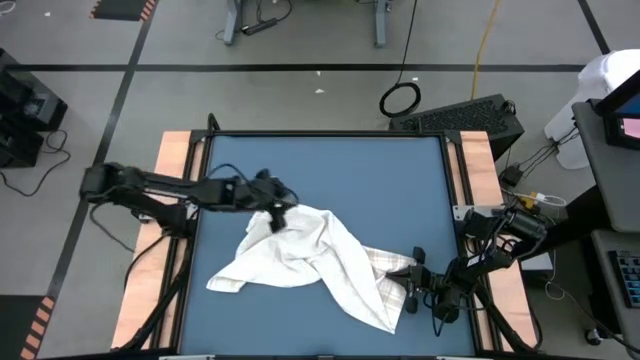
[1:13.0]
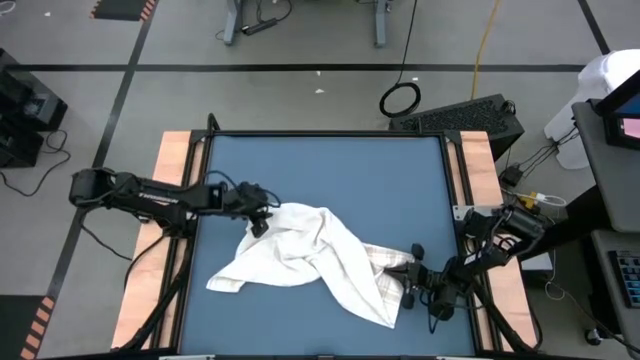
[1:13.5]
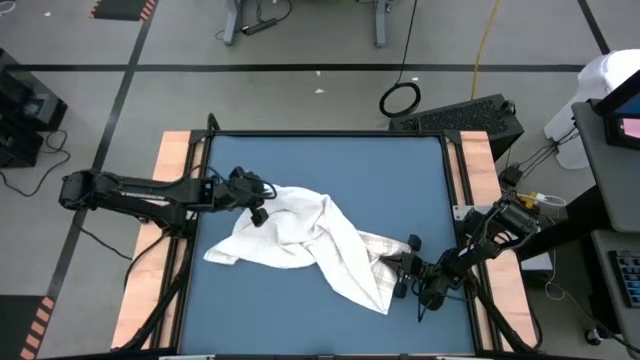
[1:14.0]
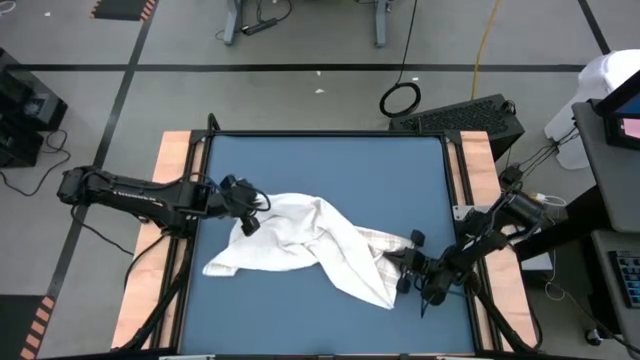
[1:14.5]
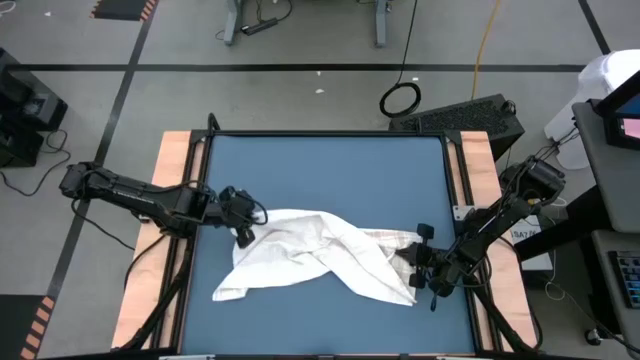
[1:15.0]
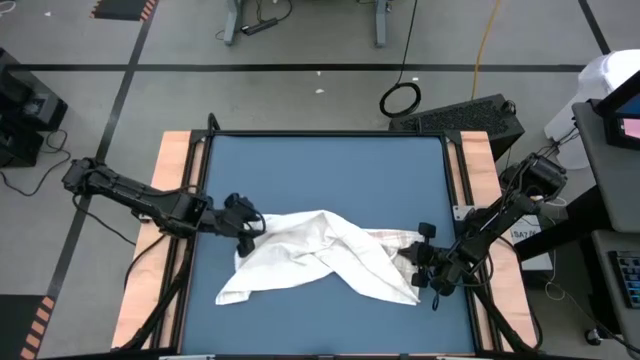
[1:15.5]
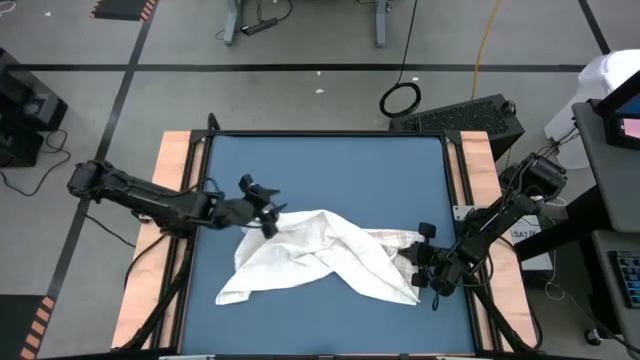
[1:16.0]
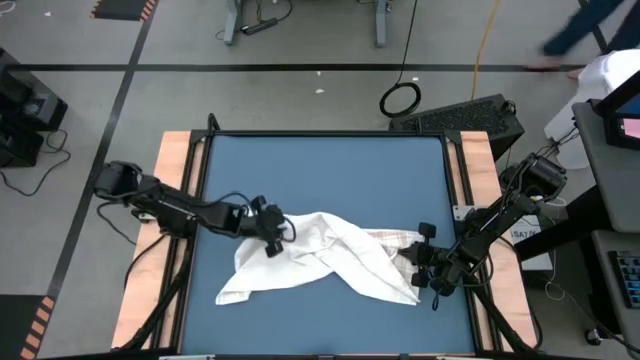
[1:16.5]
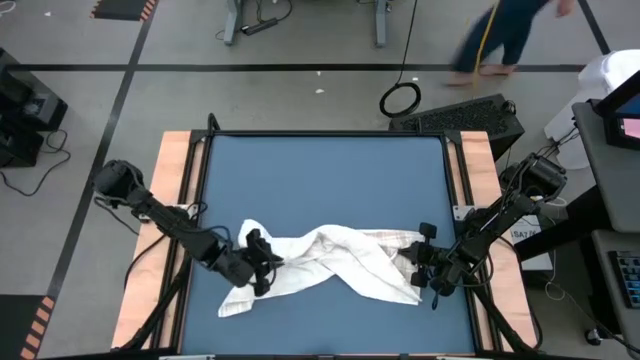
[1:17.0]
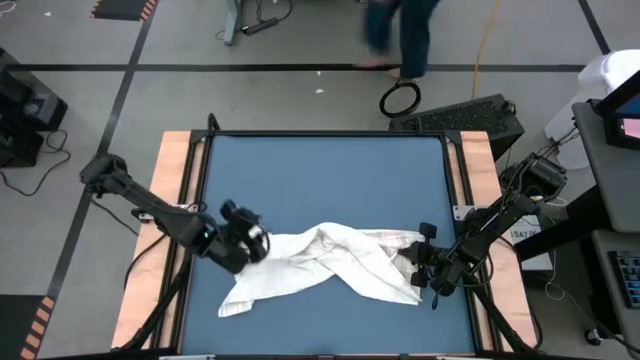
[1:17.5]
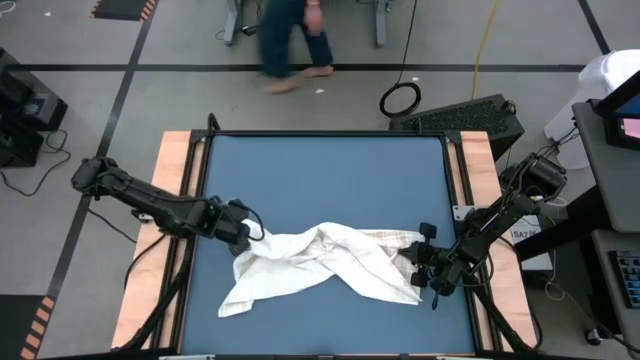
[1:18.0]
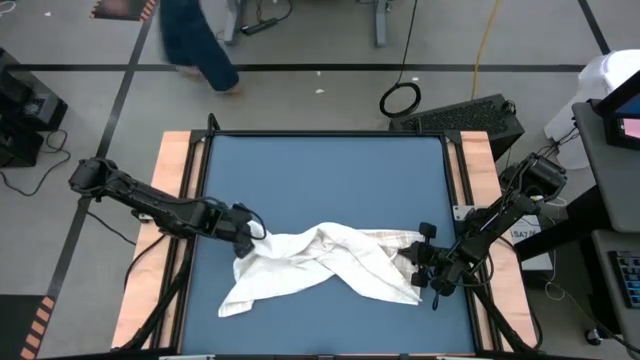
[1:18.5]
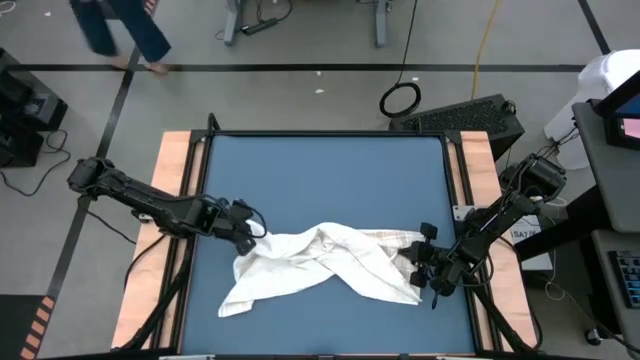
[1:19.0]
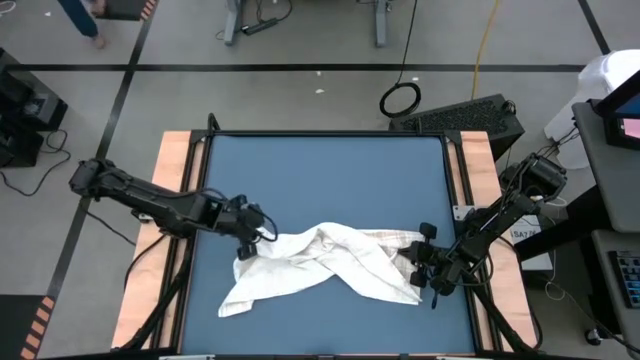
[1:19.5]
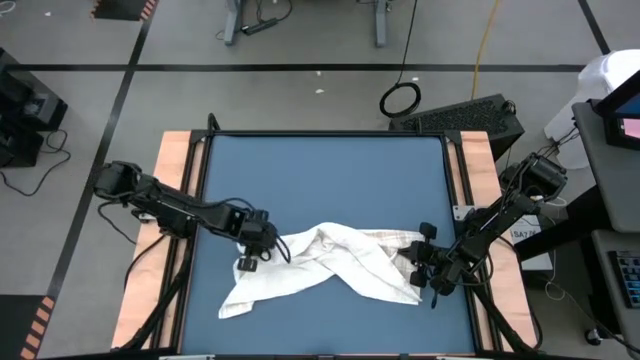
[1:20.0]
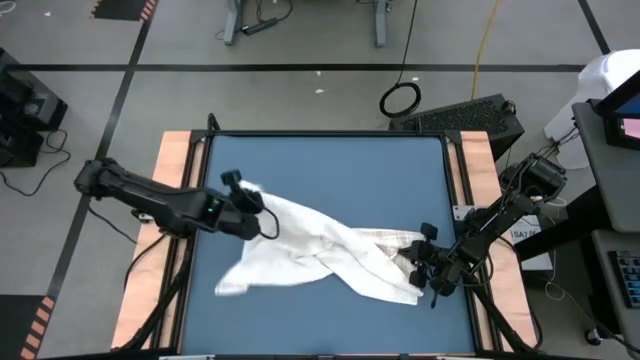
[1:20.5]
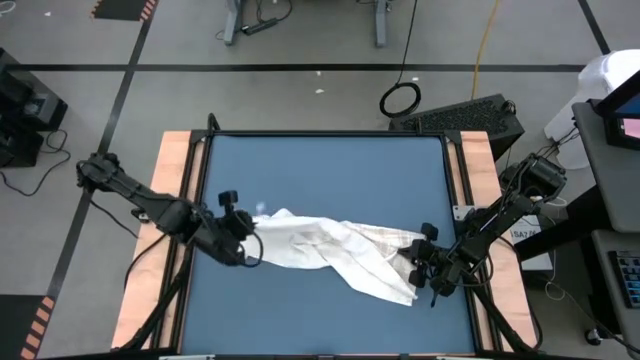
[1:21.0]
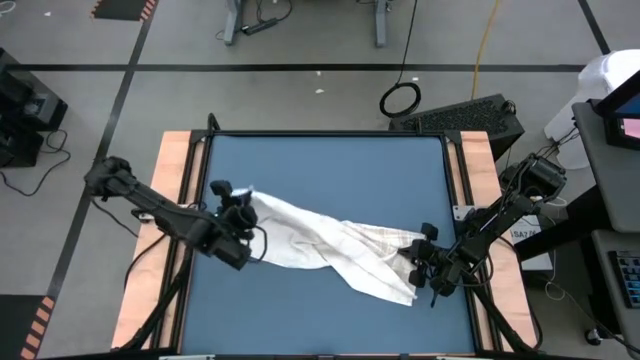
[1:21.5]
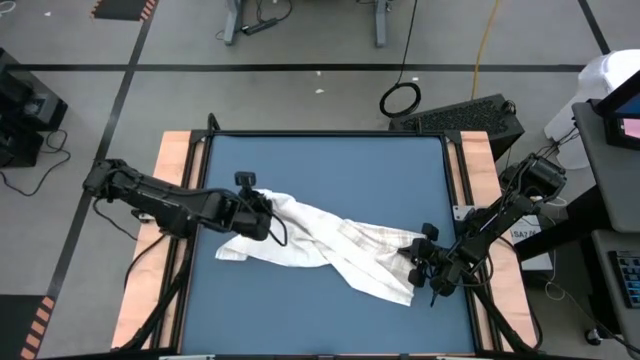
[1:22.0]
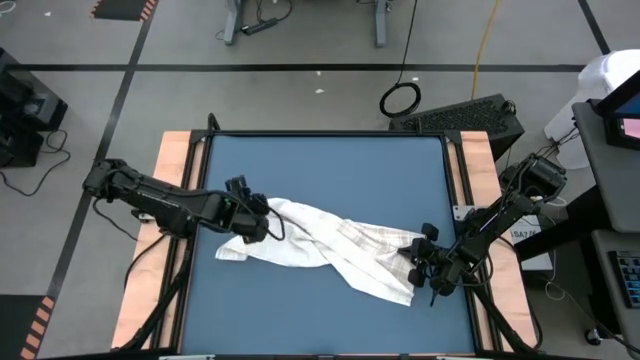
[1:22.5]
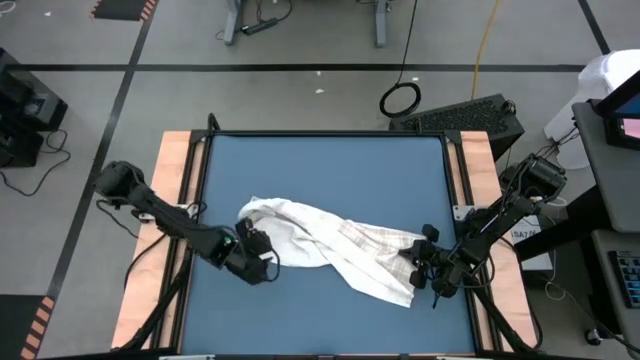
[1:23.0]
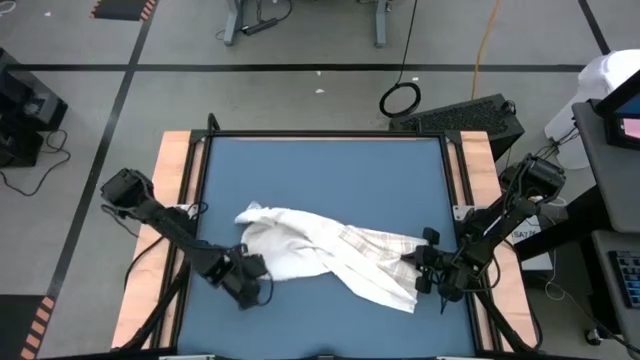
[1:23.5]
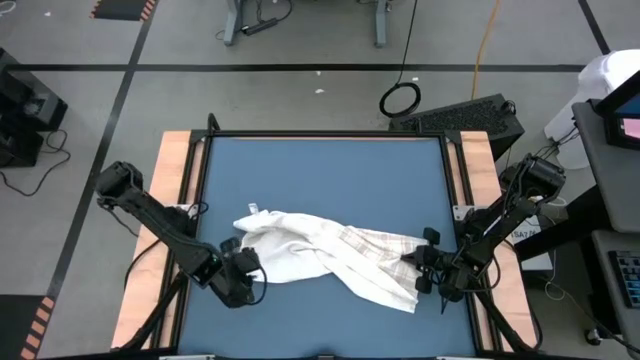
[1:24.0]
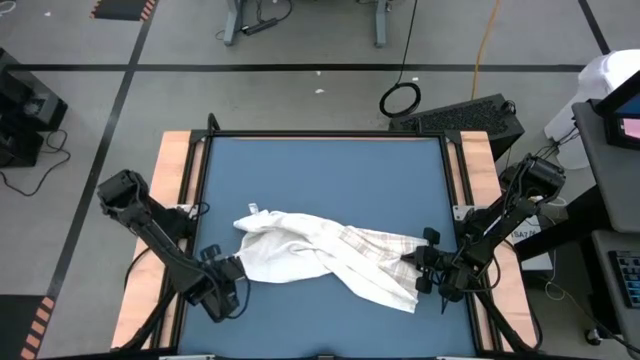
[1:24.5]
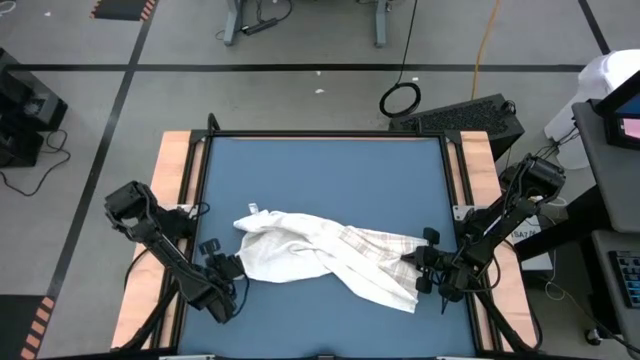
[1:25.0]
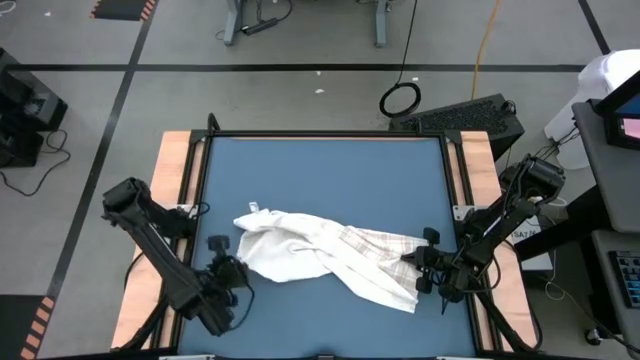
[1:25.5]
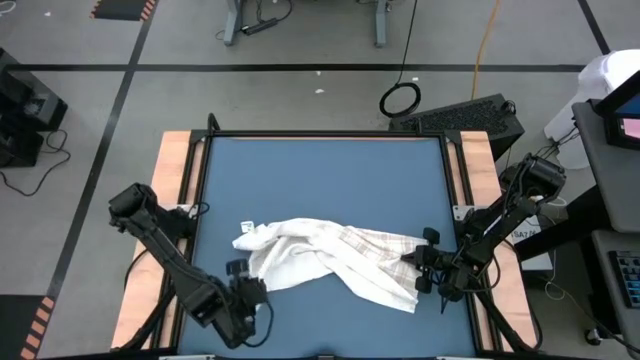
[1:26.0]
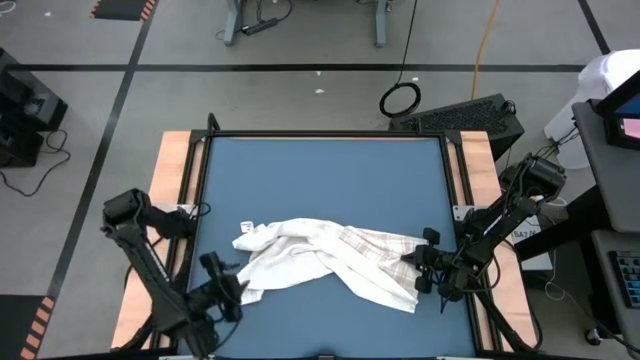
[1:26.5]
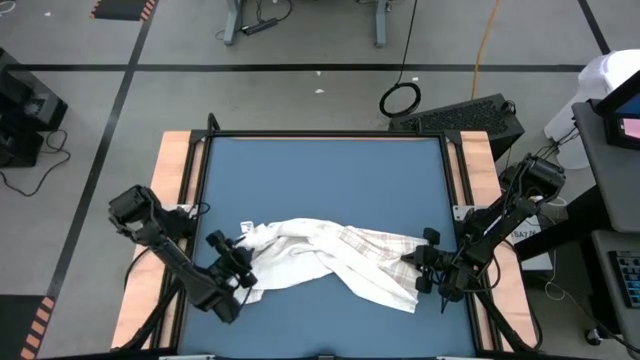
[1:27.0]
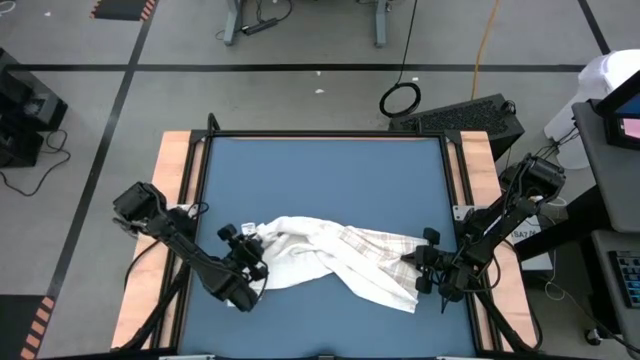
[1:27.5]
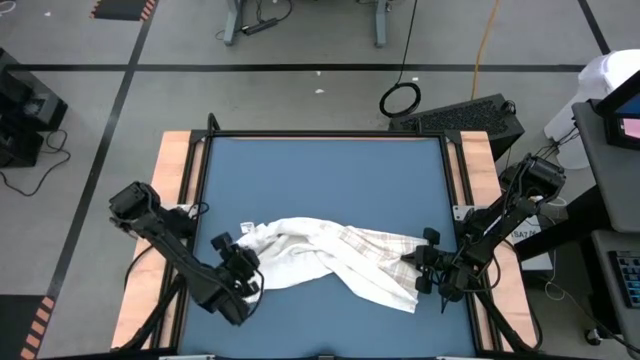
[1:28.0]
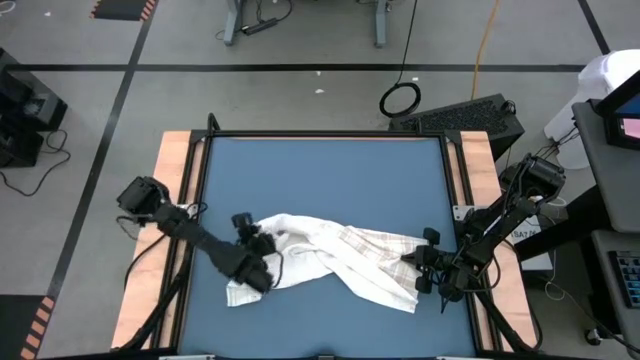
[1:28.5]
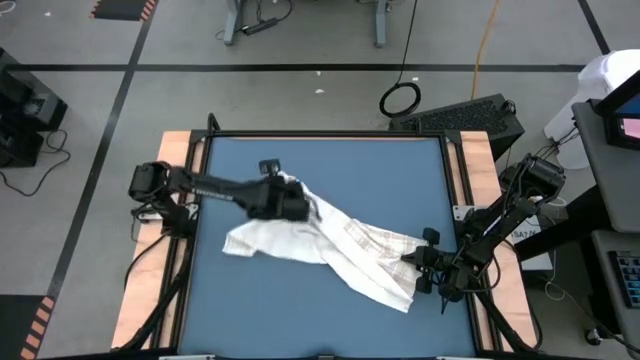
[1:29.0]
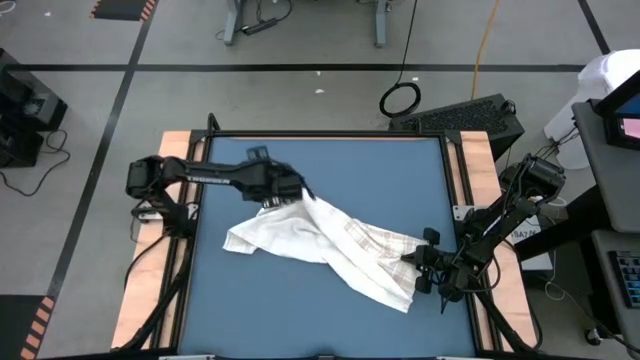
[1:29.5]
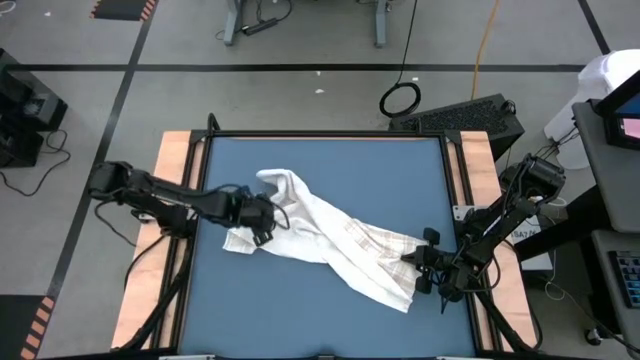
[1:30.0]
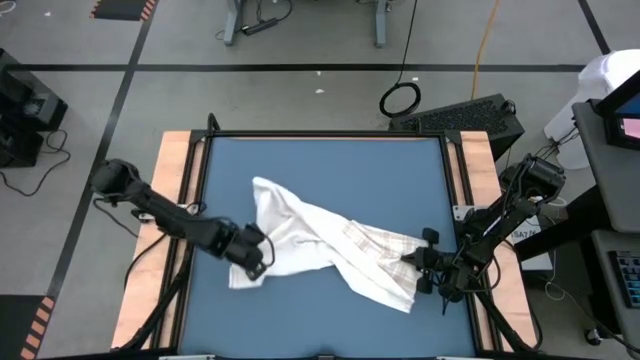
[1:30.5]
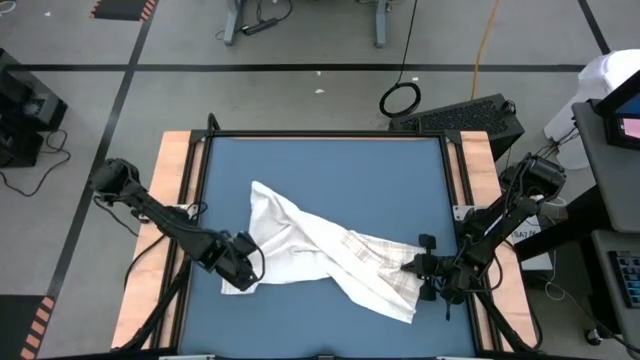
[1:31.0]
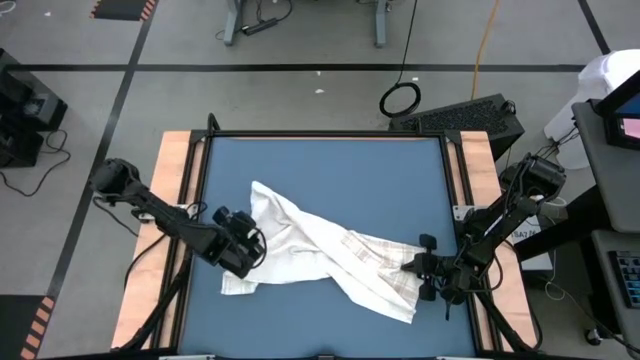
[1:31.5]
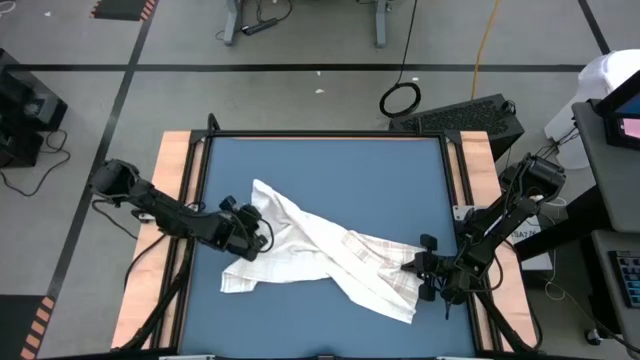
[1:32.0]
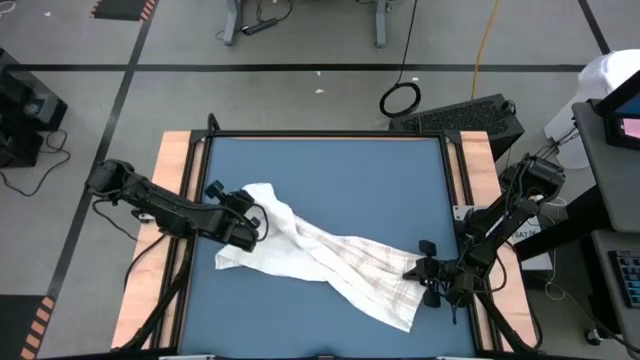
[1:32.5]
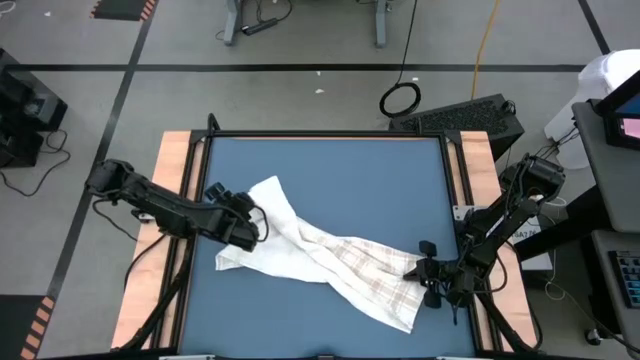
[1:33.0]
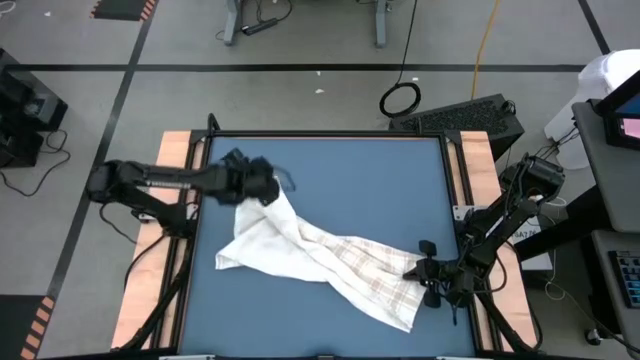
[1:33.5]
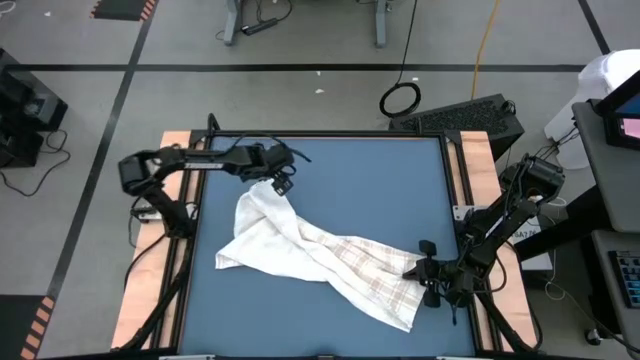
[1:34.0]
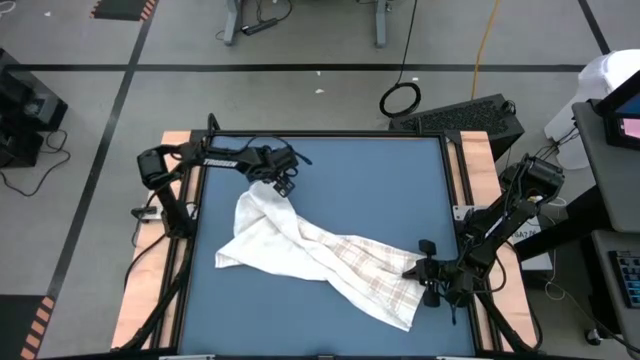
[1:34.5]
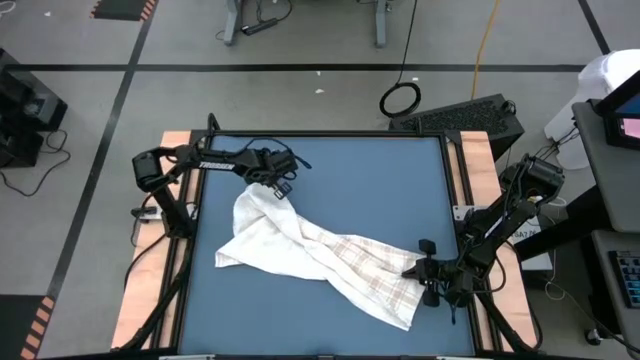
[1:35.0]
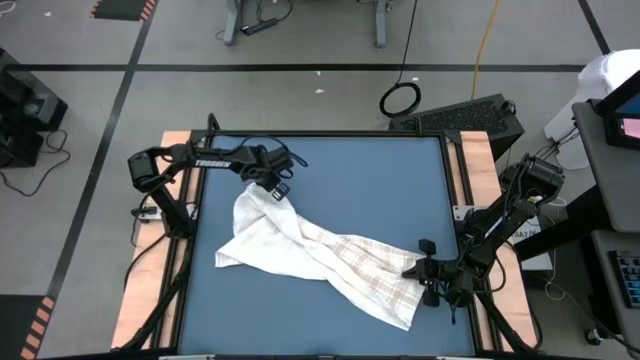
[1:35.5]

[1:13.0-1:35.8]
Task: Roll towel into tight, uniform cylinder
Roll the white towel
